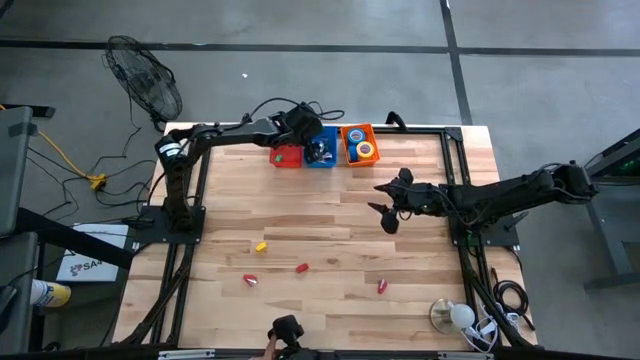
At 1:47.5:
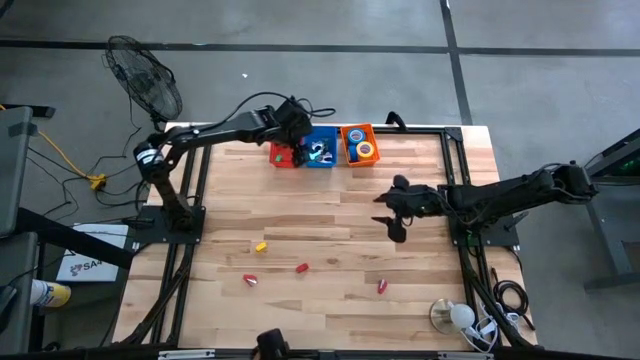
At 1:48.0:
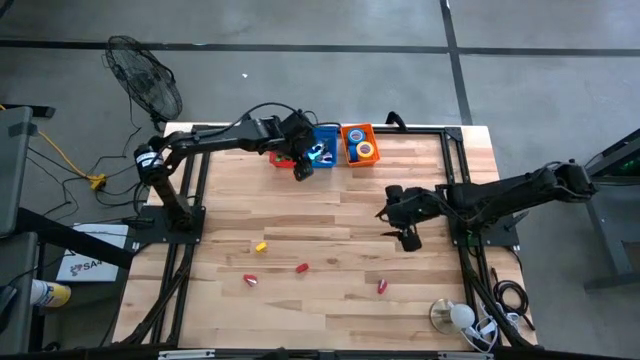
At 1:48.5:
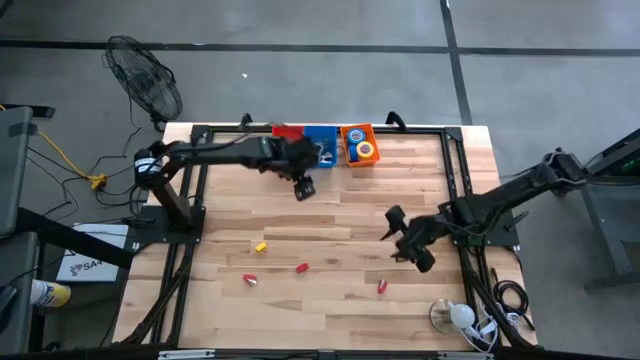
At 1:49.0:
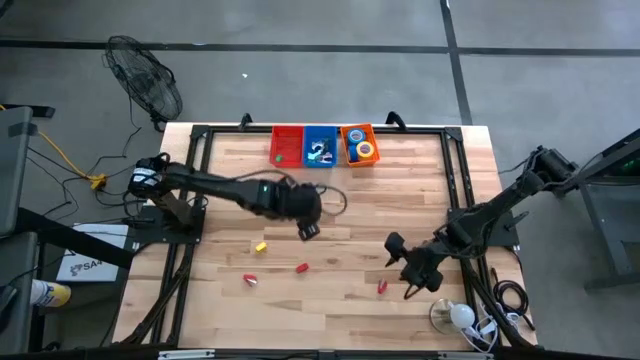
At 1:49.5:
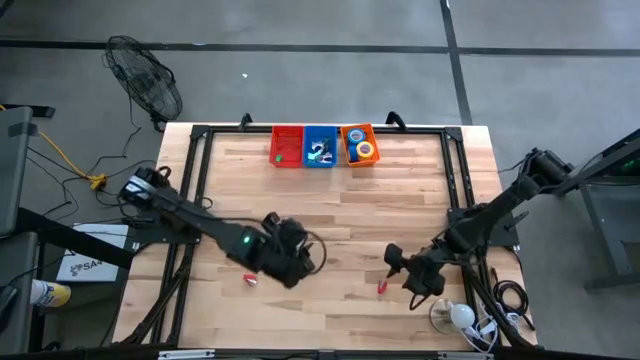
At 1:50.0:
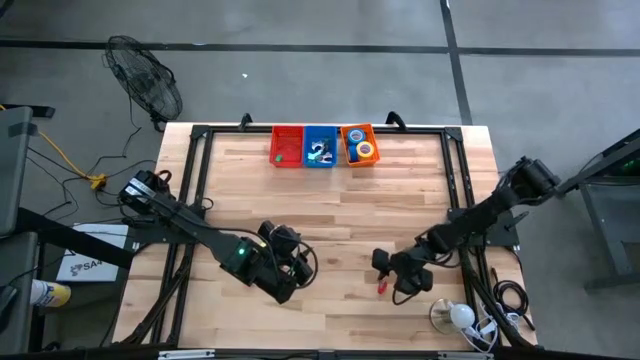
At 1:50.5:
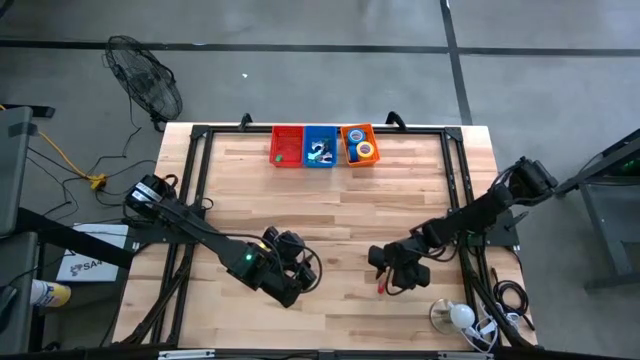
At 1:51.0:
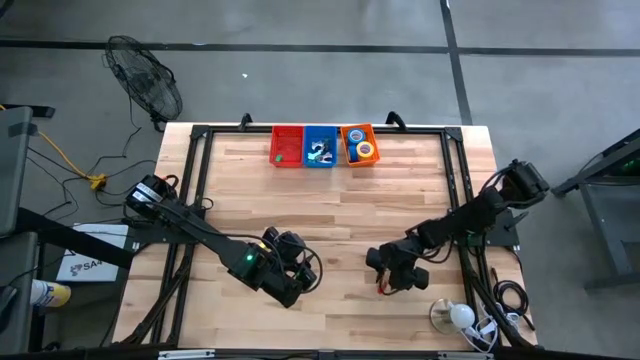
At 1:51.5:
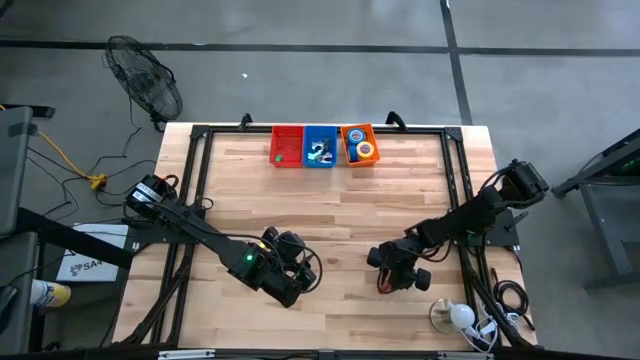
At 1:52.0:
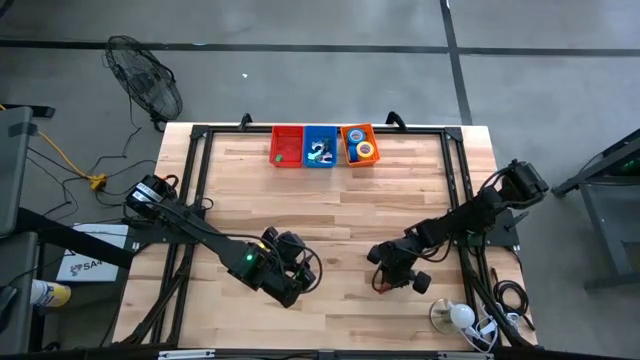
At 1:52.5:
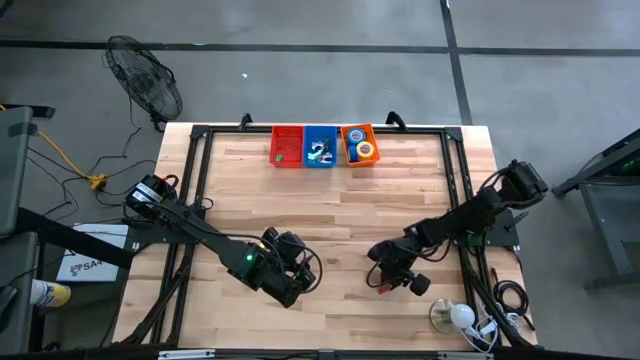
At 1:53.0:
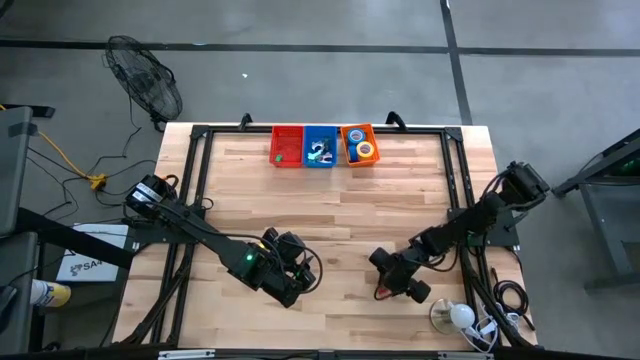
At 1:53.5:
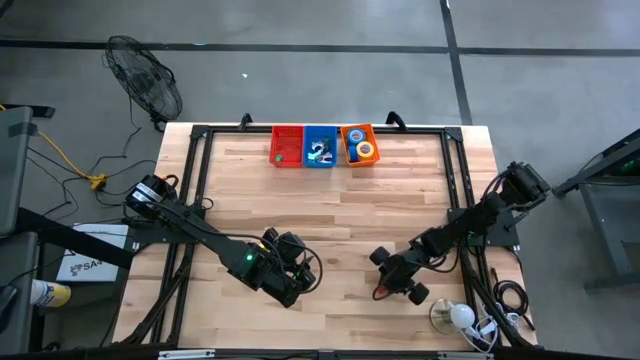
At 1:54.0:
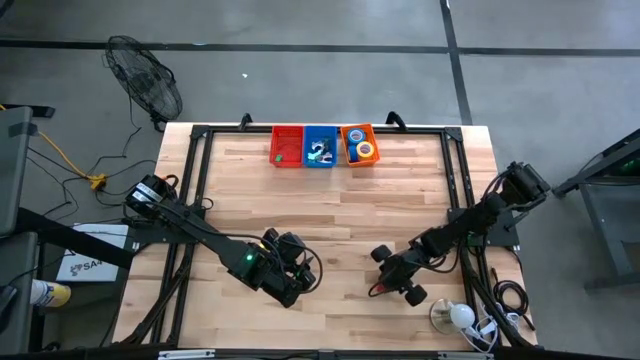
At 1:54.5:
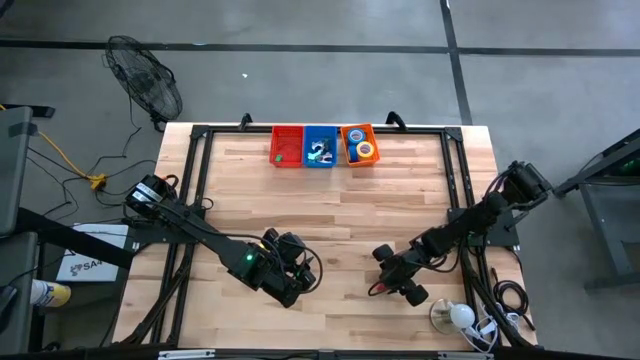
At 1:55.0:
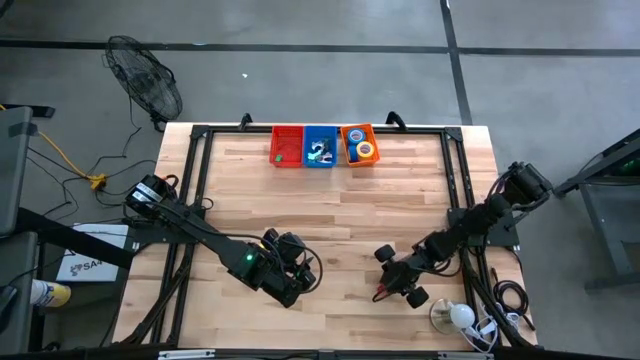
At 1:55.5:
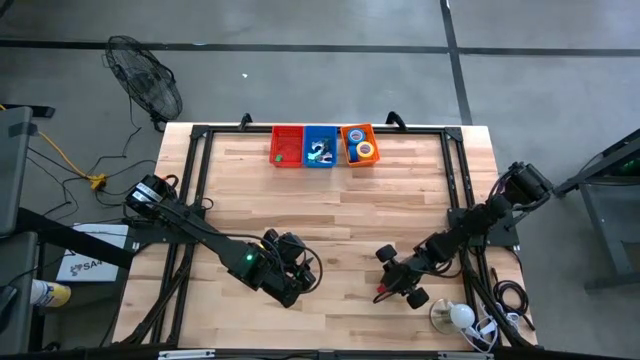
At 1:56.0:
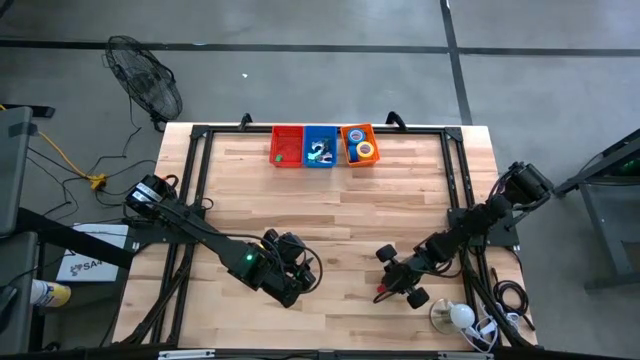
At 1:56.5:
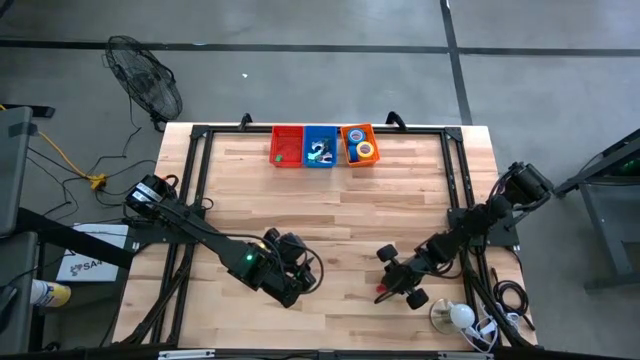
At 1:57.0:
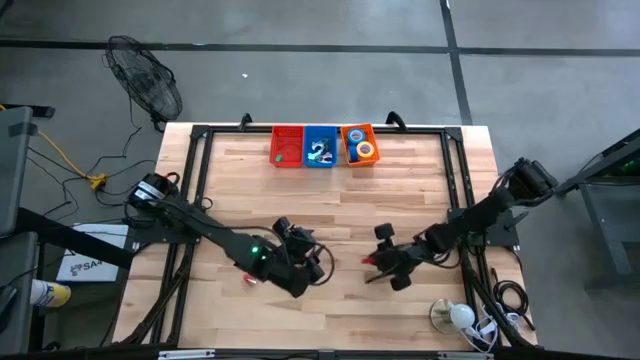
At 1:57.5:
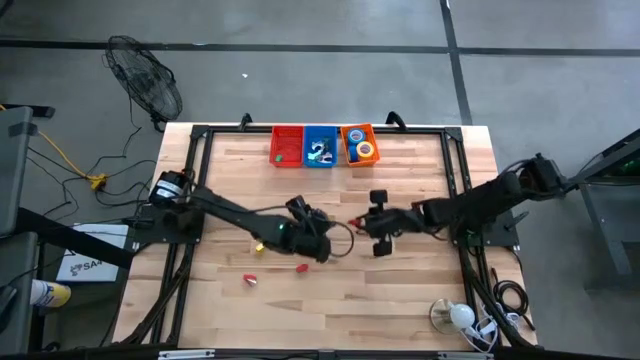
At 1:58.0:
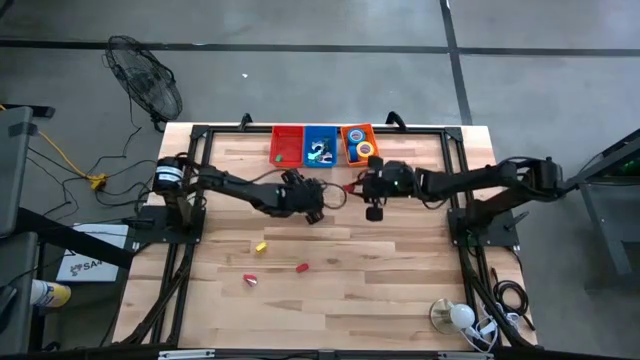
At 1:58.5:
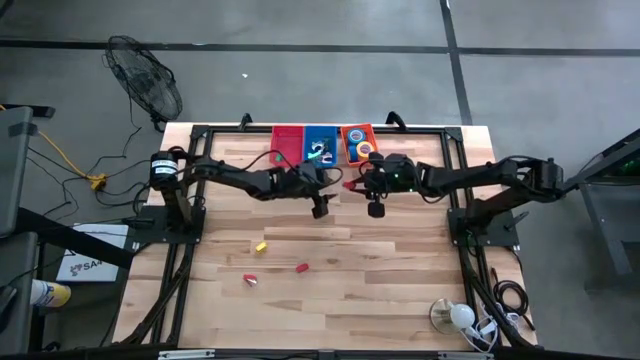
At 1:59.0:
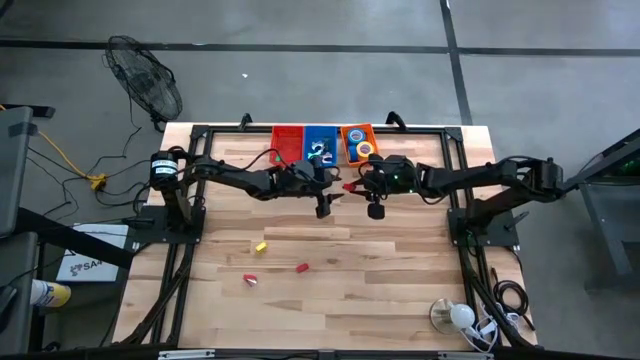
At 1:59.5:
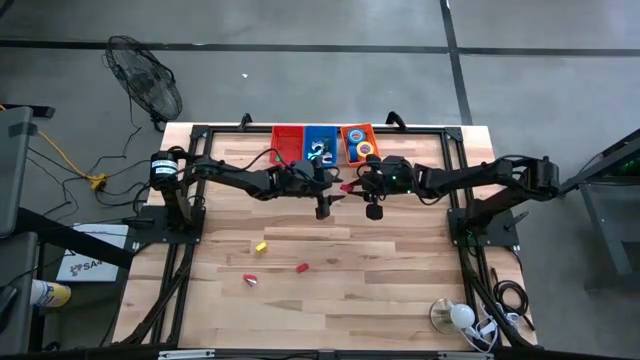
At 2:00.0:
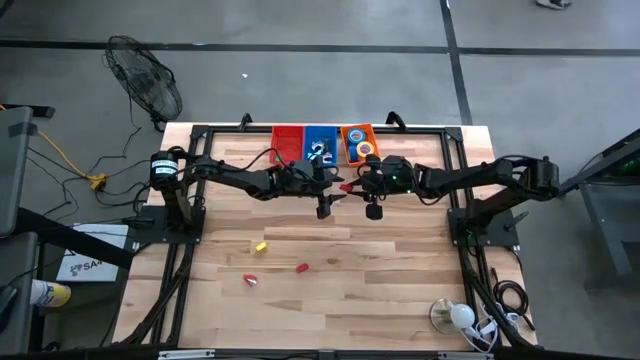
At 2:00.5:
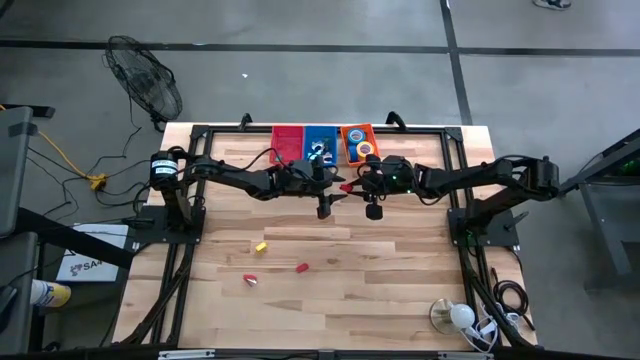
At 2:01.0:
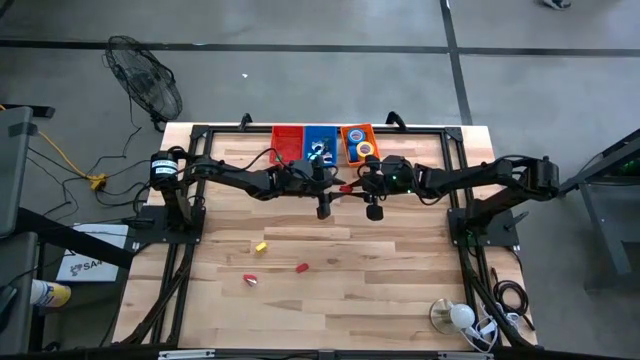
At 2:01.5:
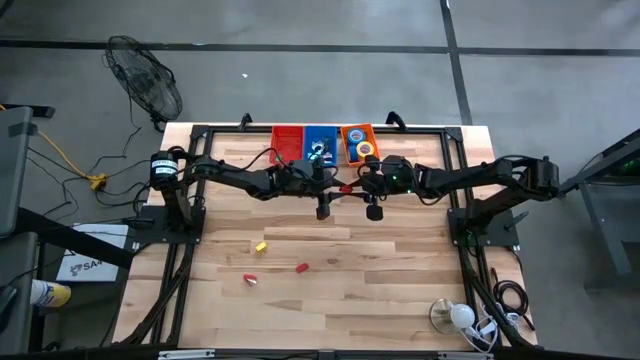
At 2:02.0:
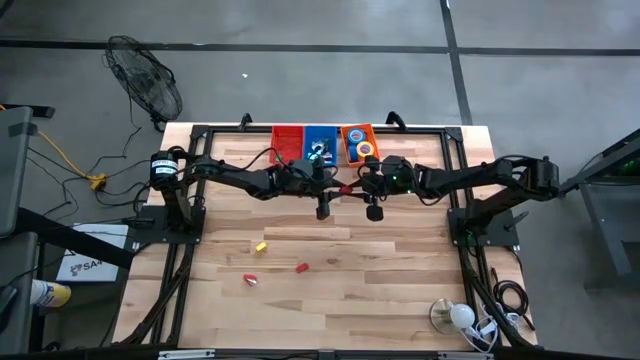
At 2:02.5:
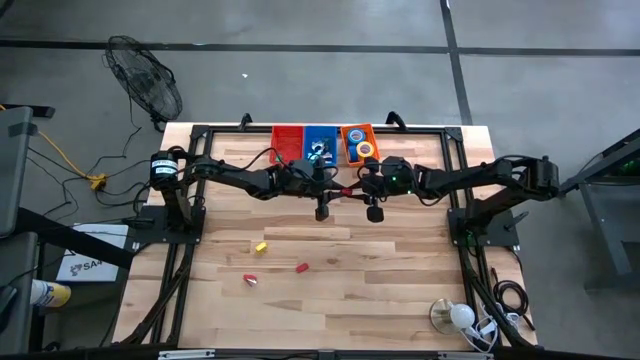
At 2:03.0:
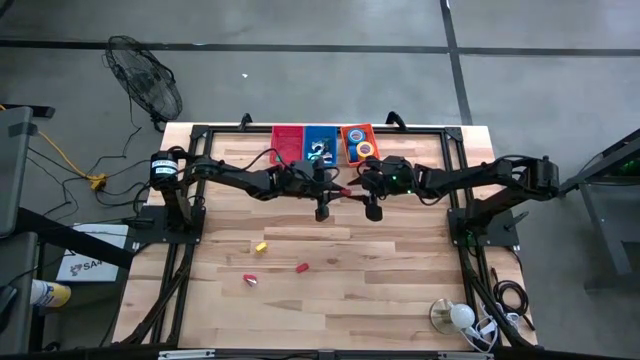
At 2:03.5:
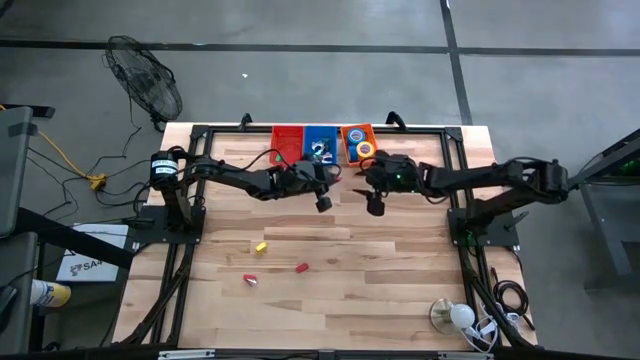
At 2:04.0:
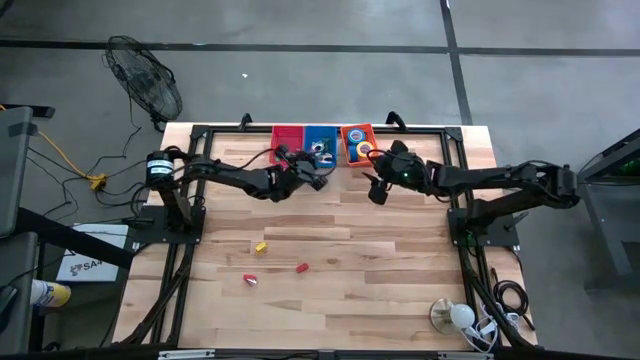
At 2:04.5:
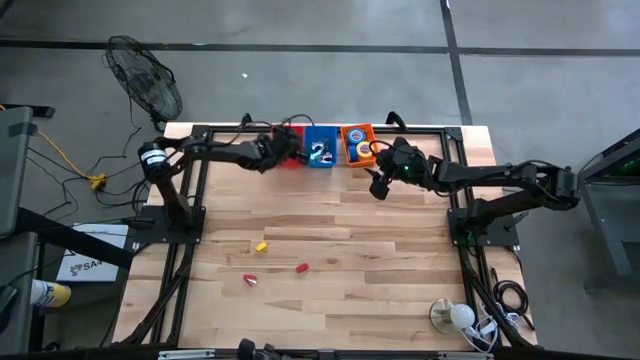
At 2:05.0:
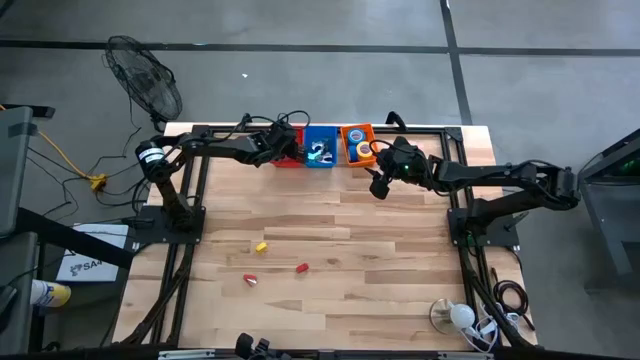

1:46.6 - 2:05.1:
Task: Pick and place Stapler, Stapler remover, tape
Put the bottom right red stapler into the red bin

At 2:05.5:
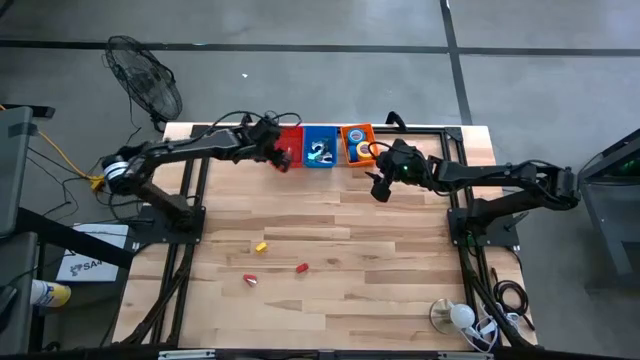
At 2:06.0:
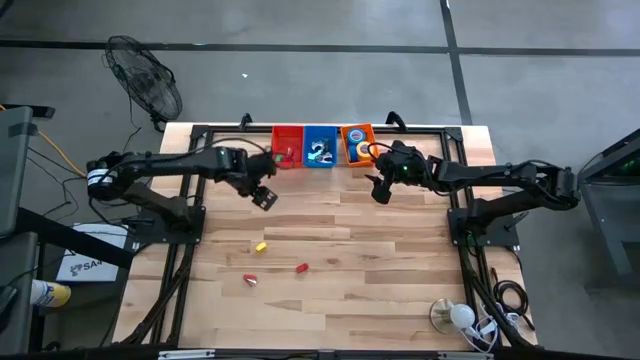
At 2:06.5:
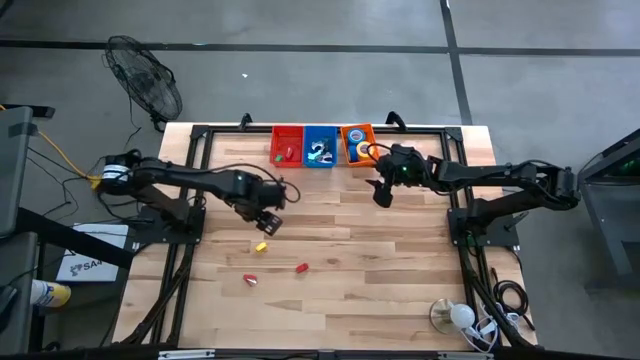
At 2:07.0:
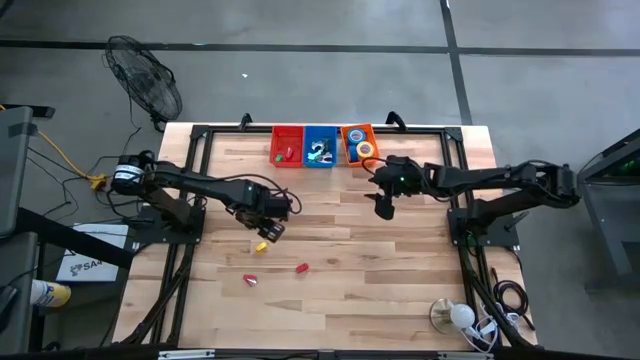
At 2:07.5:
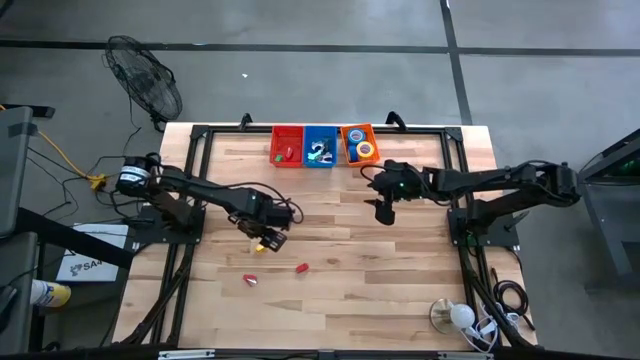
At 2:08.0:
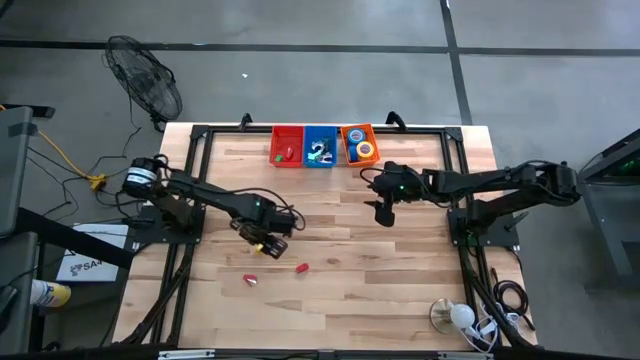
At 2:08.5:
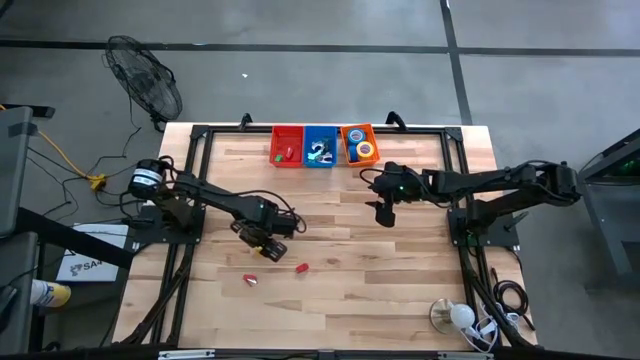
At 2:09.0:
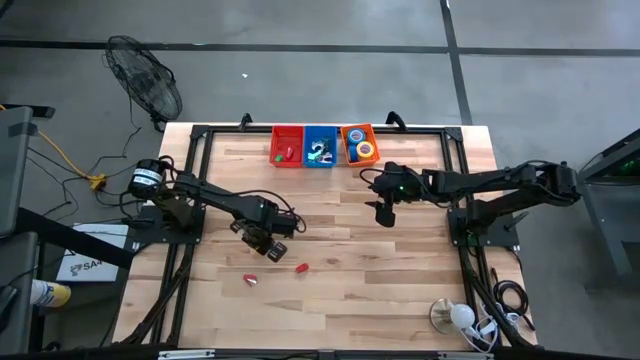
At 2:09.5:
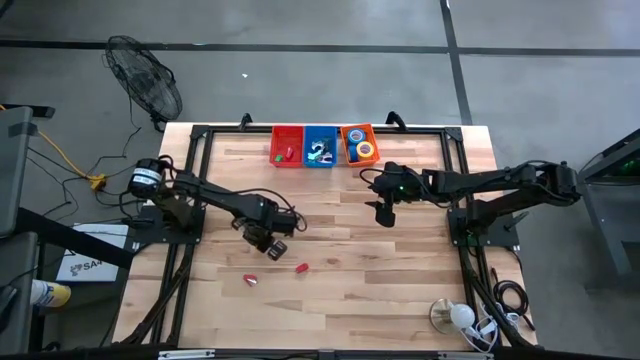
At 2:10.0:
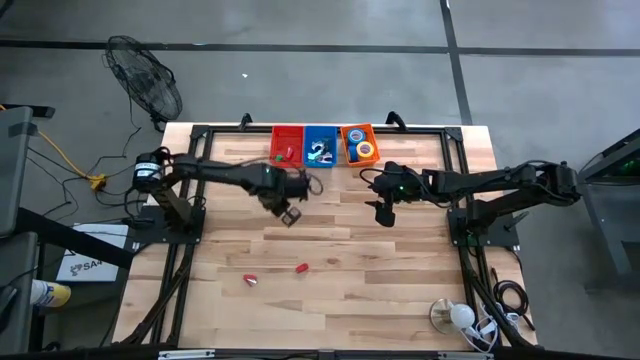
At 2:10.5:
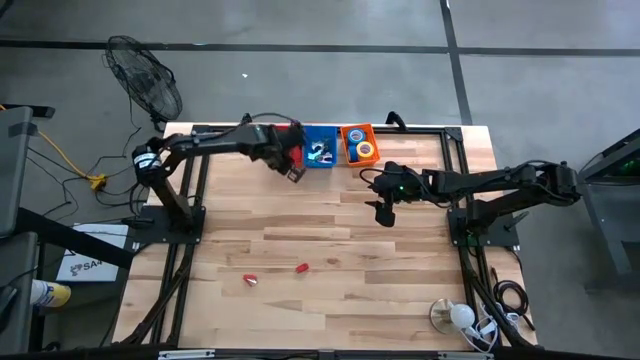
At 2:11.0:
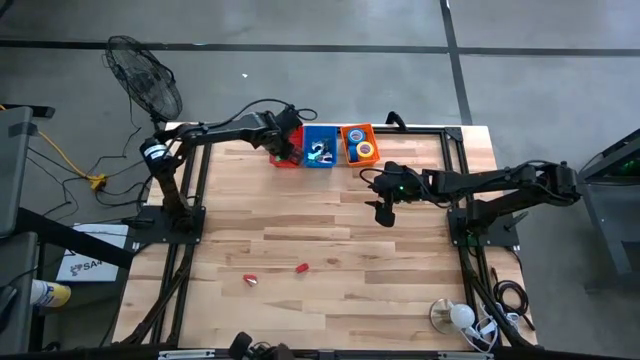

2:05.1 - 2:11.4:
Put the yellow stapler into the red bin
